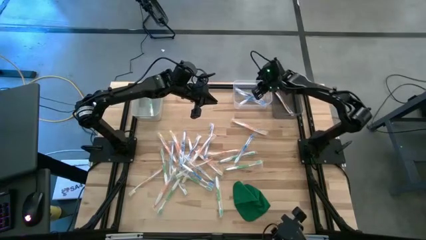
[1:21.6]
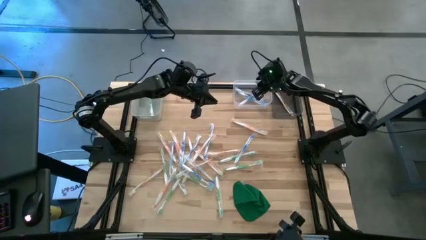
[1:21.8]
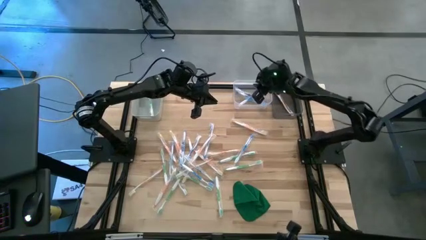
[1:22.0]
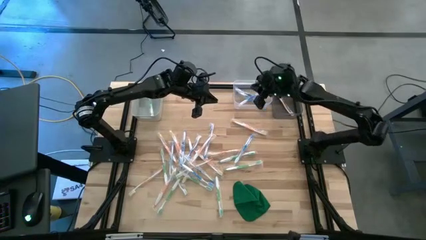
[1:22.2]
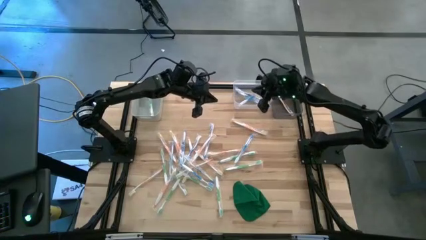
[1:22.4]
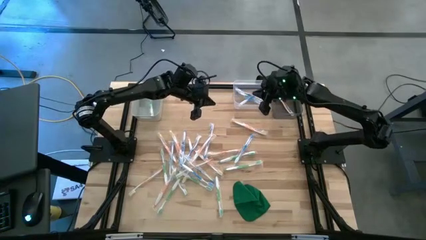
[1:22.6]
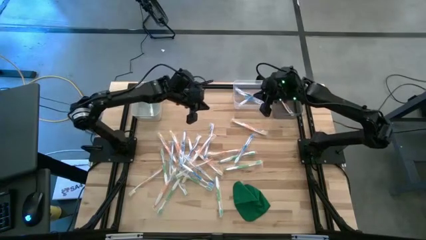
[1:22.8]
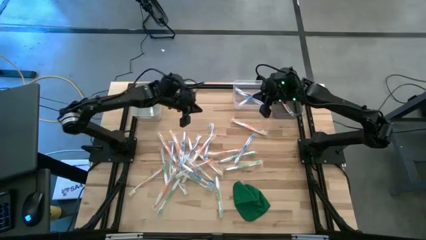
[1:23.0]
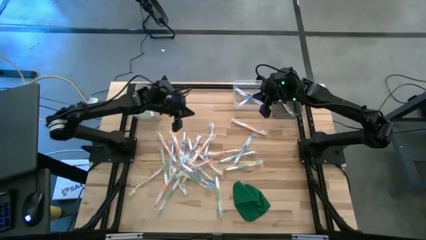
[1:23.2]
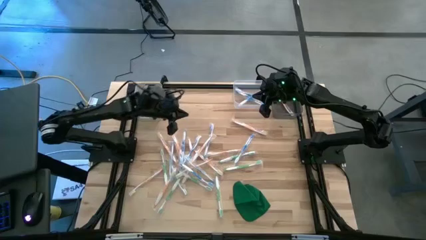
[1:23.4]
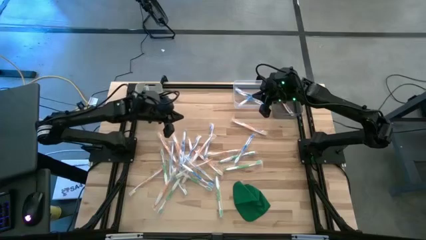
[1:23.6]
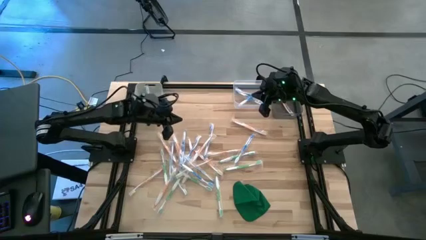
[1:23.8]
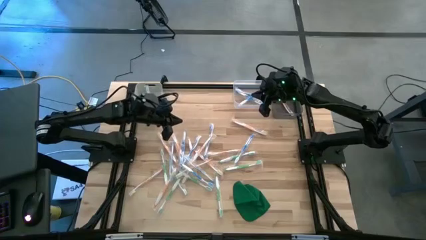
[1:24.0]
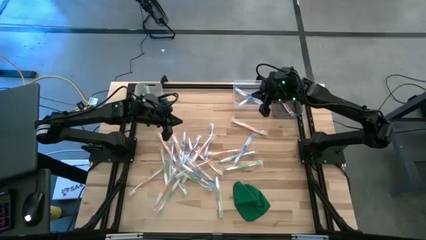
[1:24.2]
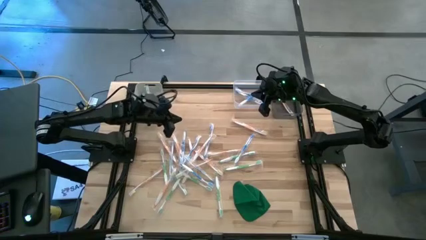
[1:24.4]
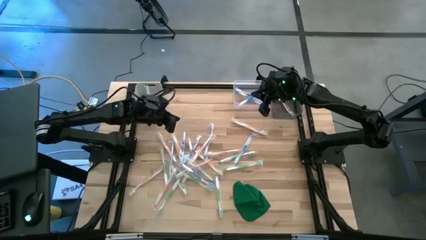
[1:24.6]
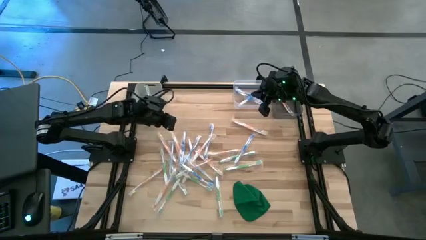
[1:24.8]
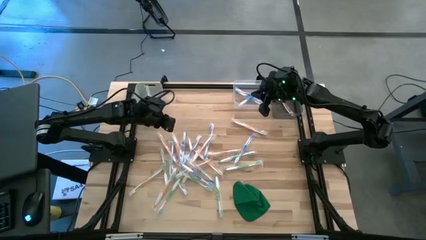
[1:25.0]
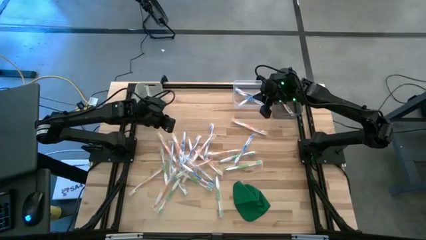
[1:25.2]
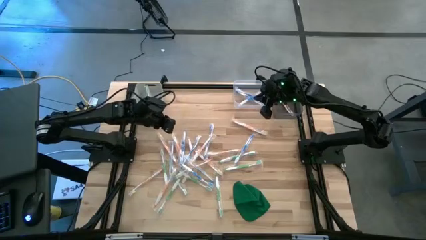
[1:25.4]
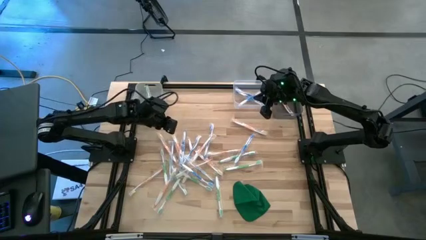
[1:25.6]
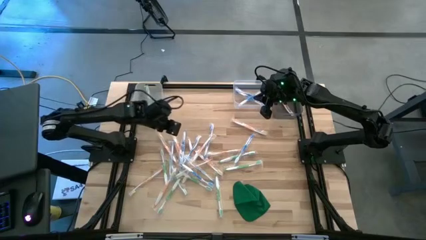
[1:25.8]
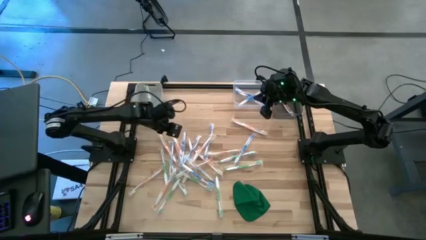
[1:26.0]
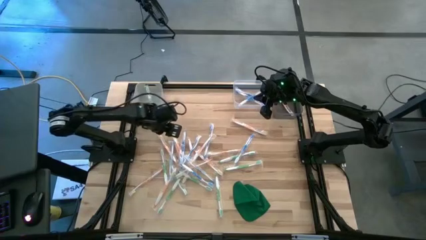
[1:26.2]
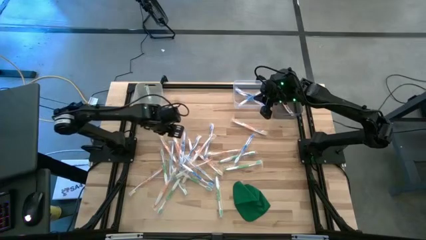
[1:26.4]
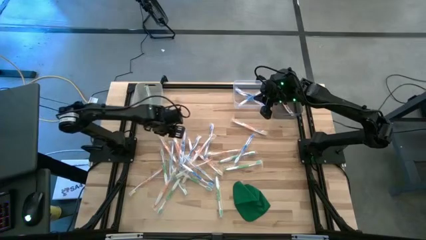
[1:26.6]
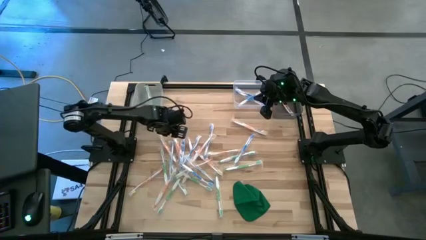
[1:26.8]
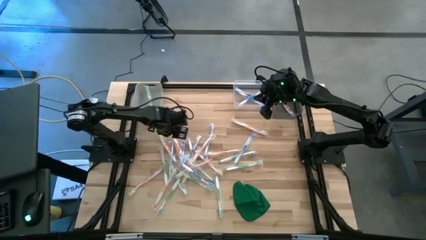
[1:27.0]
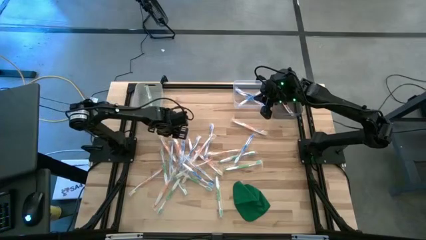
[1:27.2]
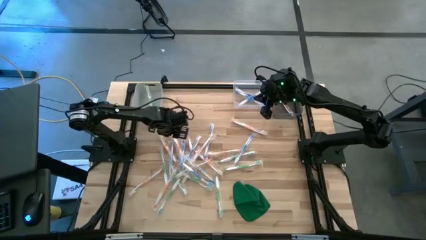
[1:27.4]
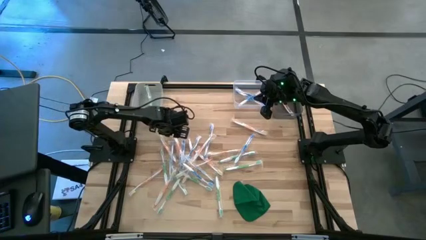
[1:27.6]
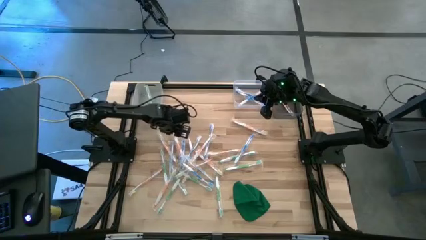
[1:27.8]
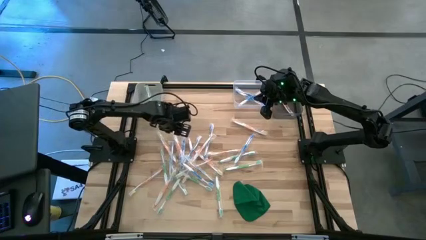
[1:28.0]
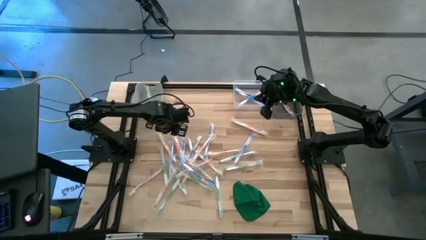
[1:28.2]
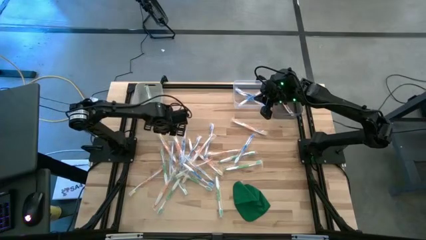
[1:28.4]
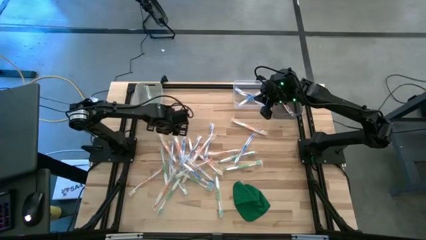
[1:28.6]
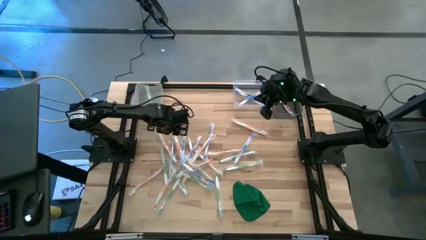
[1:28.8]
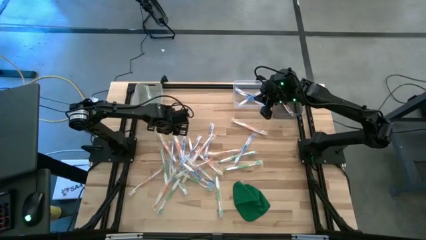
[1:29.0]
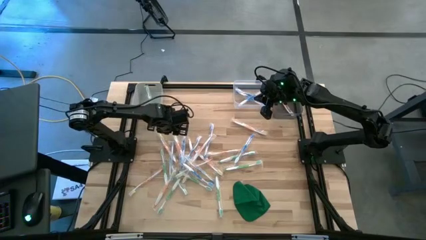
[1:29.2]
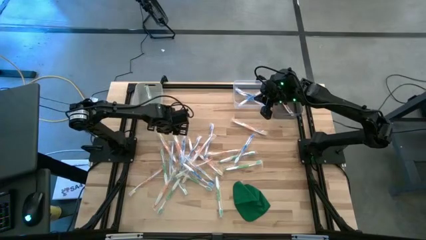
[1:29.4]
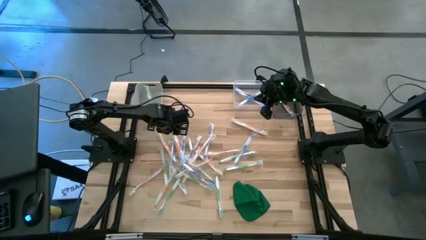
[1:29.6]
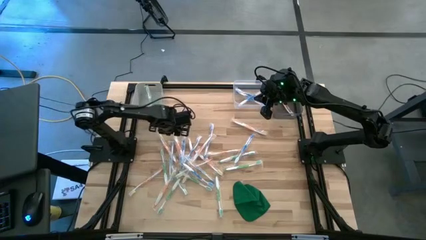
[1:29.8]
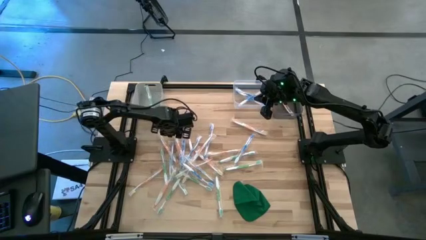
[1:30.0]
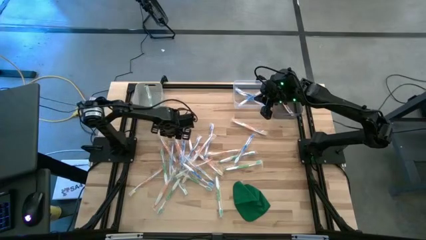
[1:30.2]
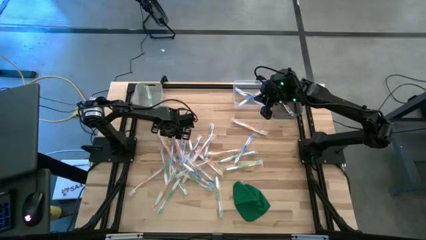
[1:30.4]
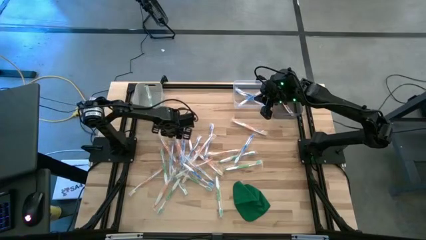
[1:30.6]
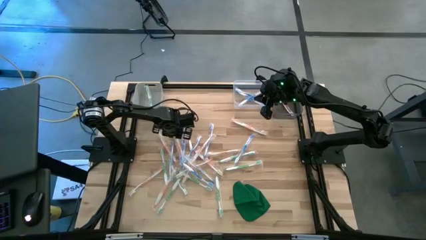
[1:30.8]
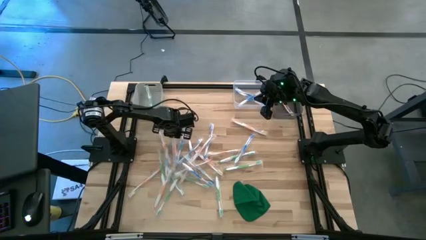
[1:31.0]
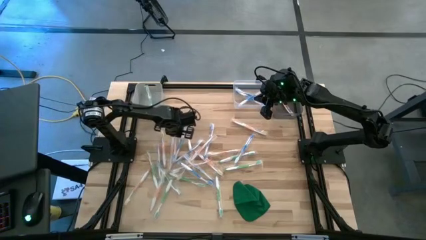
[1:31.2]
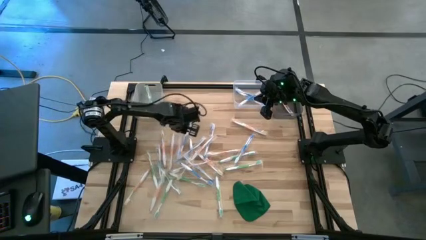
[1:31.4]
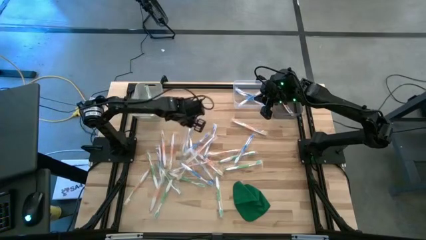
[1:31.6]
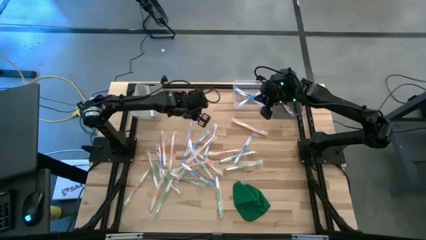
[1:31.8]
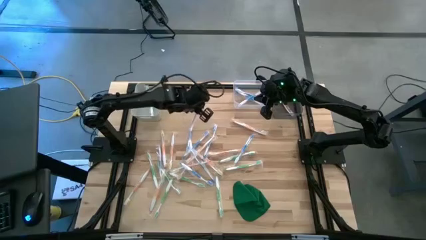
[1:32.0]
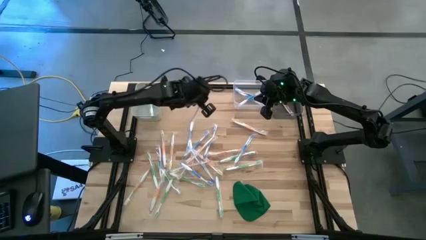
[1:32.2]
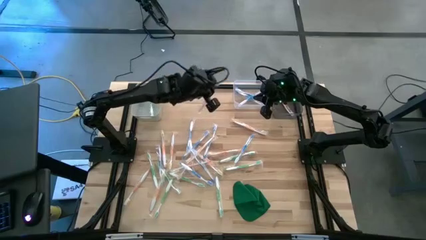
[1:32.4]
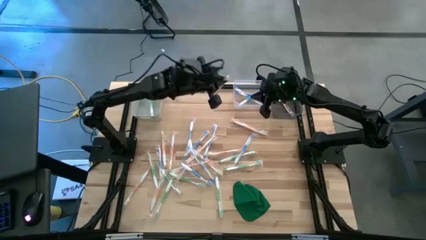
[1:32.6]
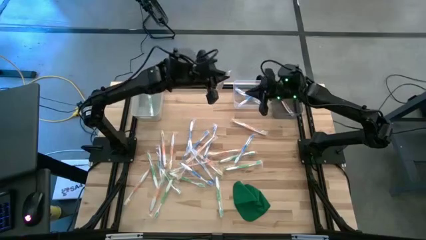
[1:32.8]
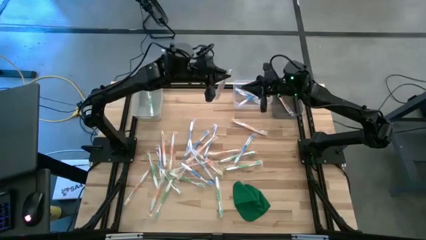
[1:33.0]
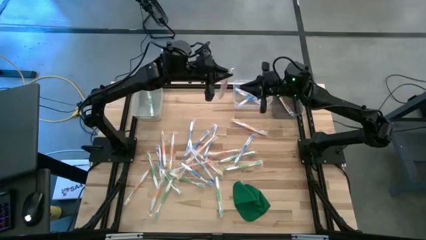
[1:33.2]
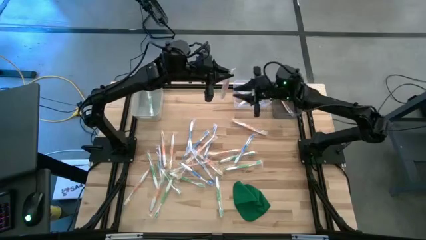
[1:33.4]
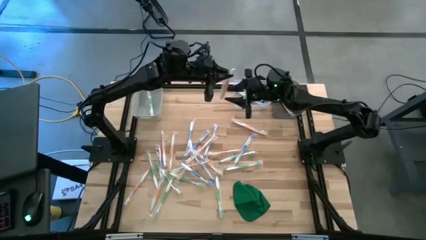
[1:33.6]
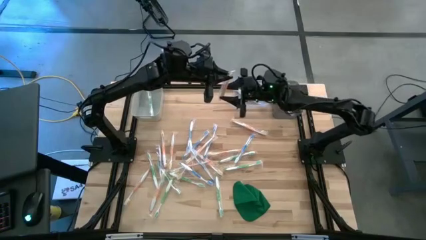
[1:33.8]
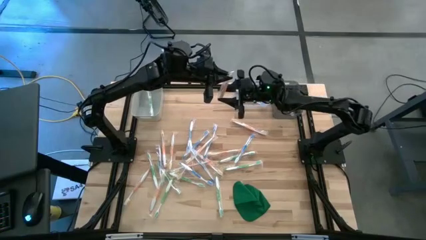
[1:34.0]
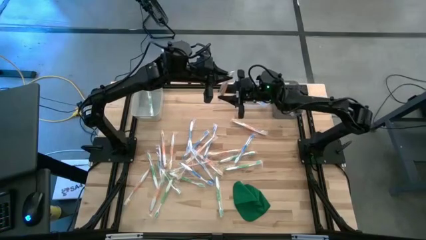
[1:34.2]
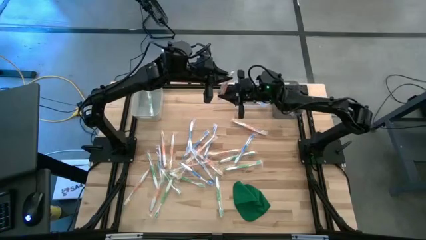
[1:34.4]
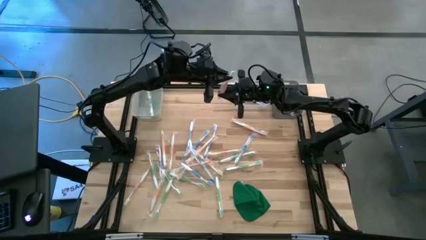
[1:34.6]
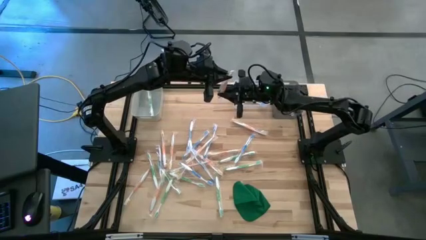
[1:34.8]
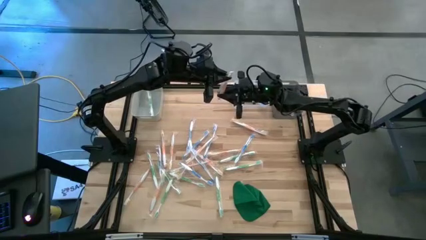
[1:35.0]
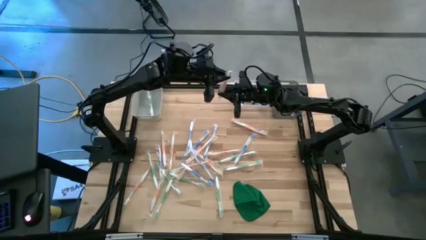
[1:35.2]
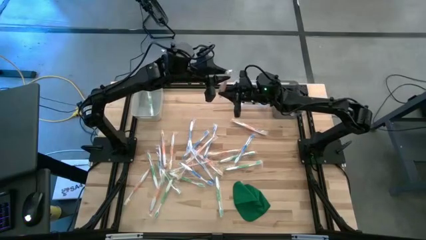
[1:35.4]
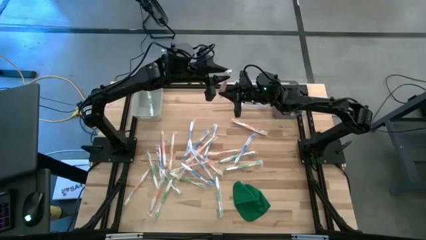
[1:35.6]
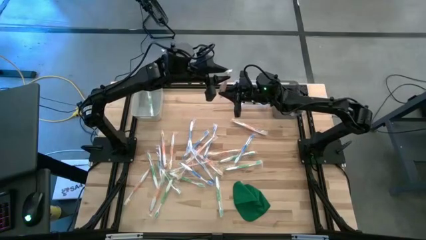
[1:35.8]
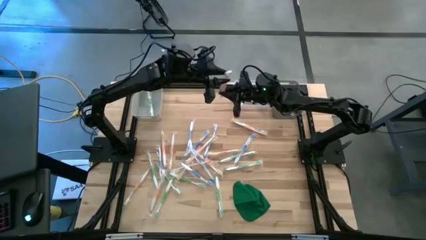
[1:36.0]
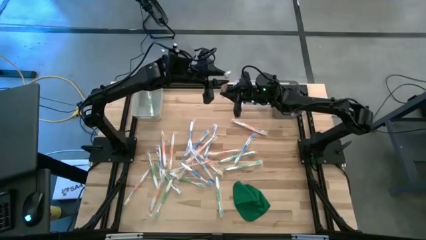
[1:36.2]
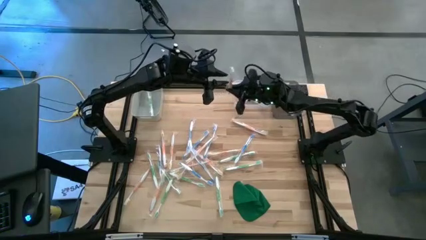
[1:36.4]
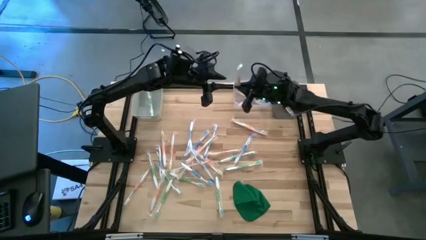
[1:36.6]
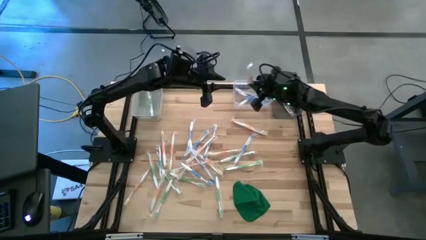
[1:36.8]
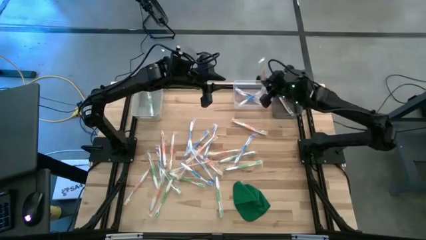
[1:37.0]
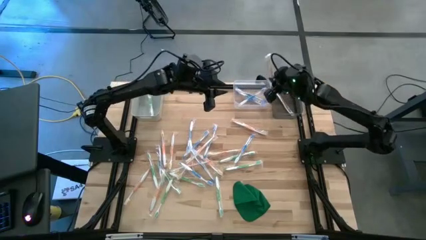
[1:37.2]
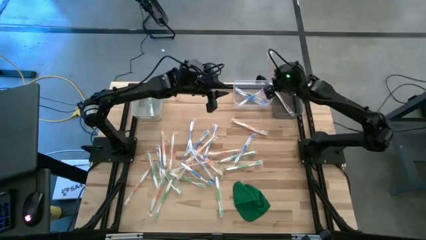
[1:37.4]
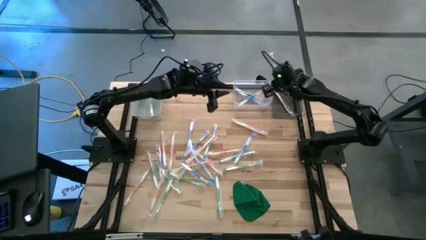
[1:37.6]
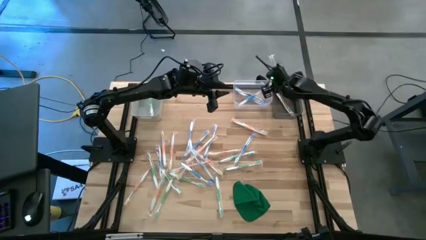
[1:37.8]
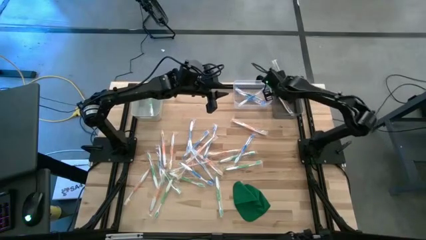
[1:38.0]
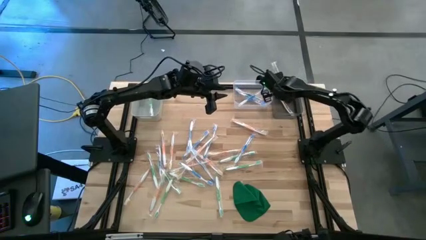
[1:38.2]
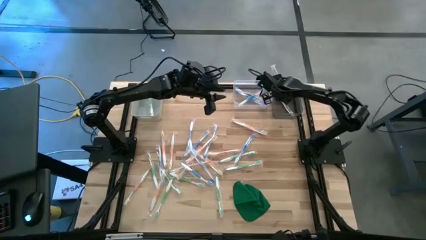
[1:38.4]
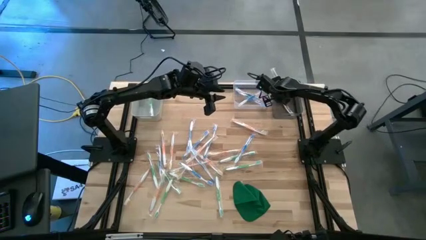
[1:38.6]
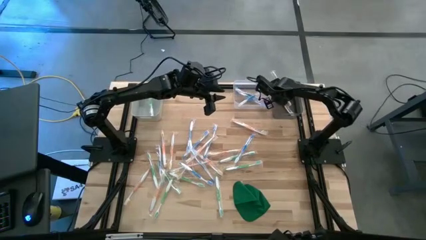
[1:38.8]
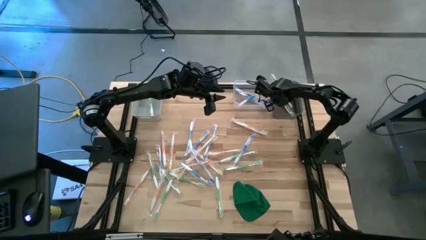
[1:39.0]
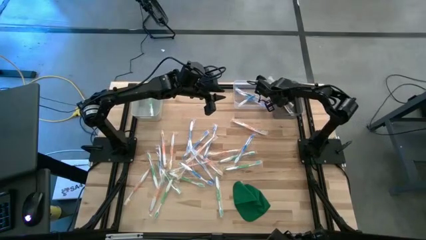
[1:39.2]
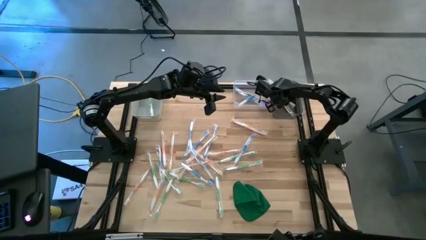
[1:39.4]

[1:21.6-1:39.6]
Task: Pick & Place Toothbrushes
Put the orange toothbrush into the black bin
